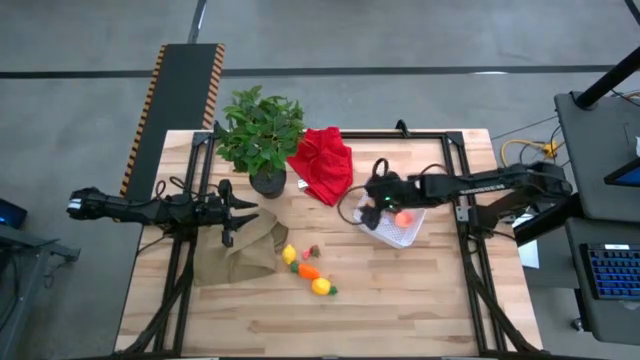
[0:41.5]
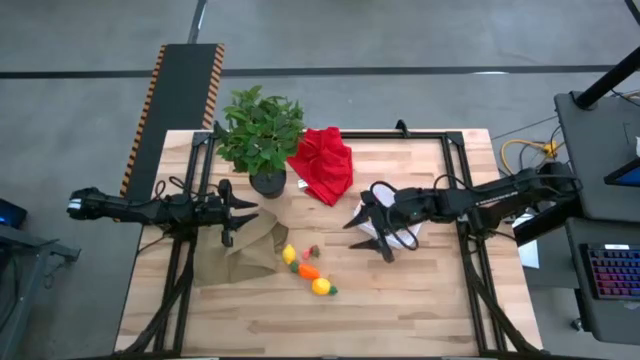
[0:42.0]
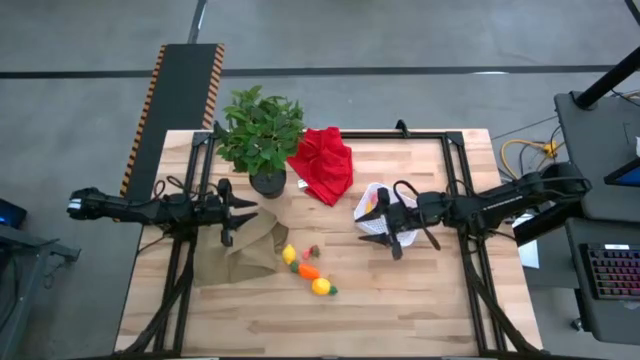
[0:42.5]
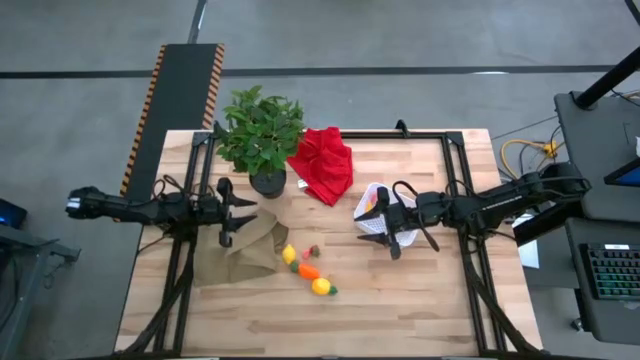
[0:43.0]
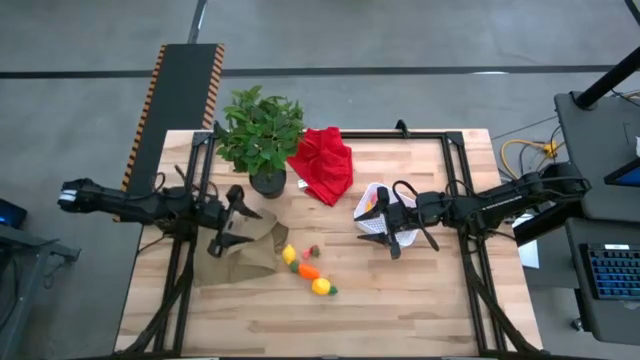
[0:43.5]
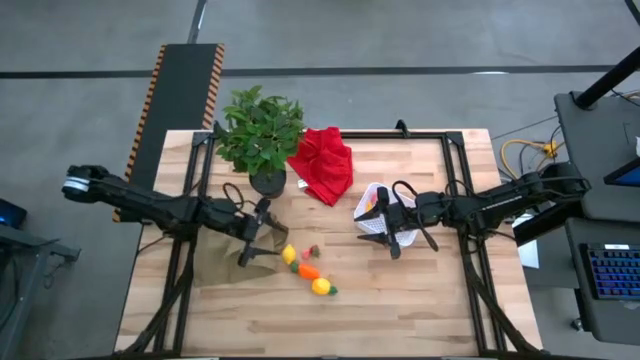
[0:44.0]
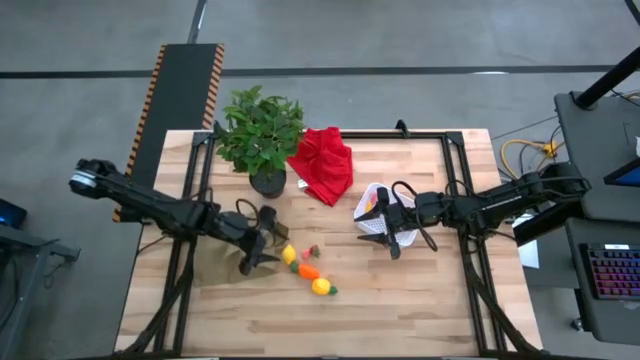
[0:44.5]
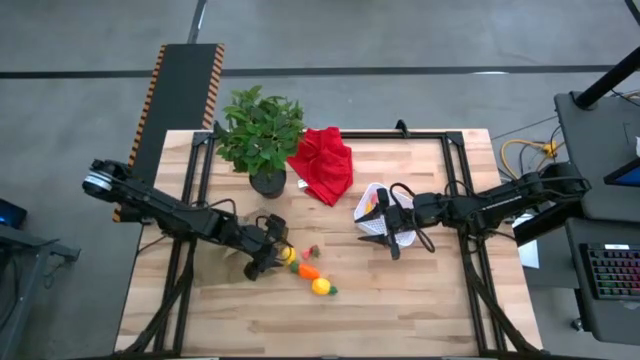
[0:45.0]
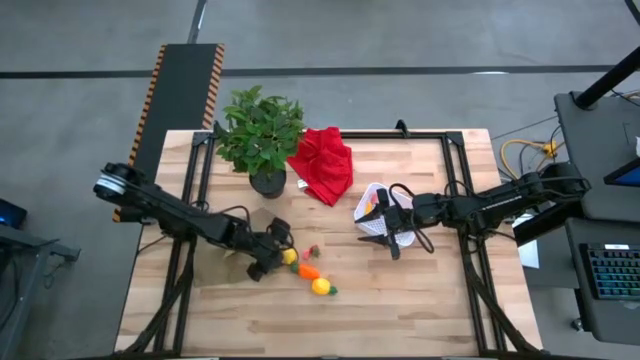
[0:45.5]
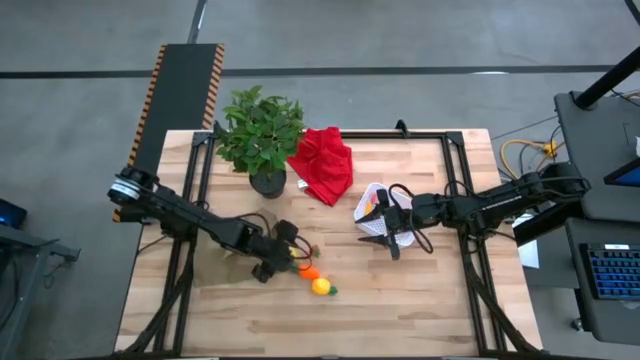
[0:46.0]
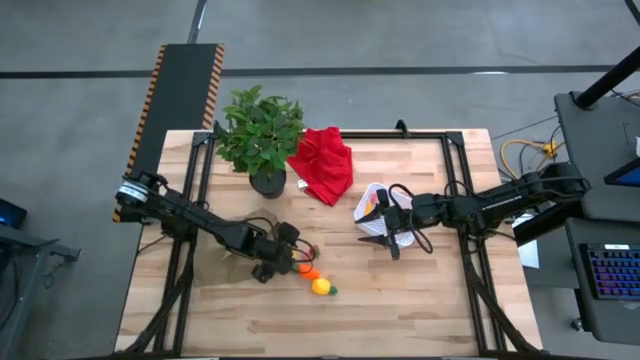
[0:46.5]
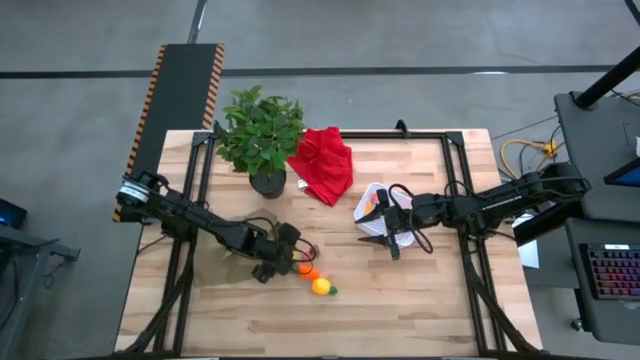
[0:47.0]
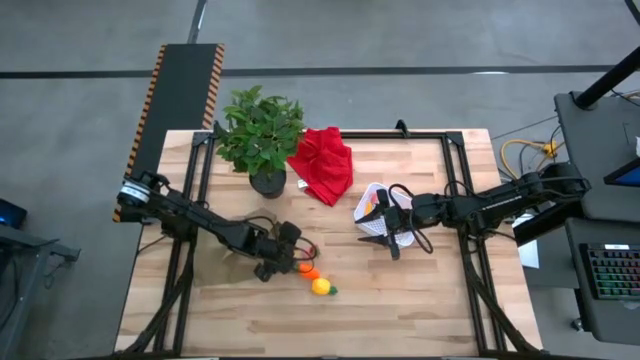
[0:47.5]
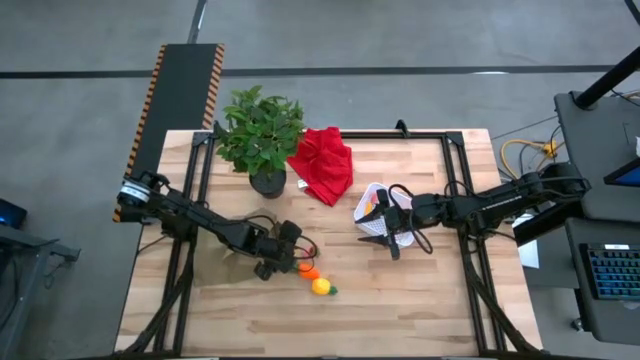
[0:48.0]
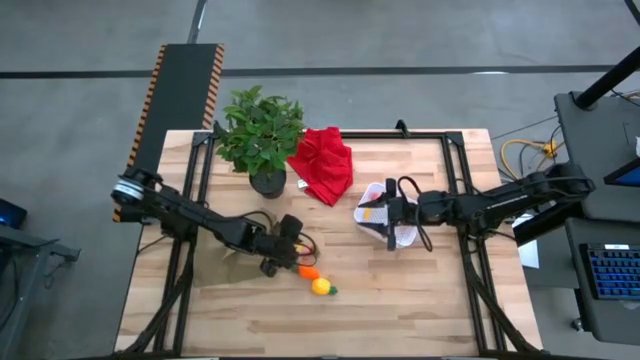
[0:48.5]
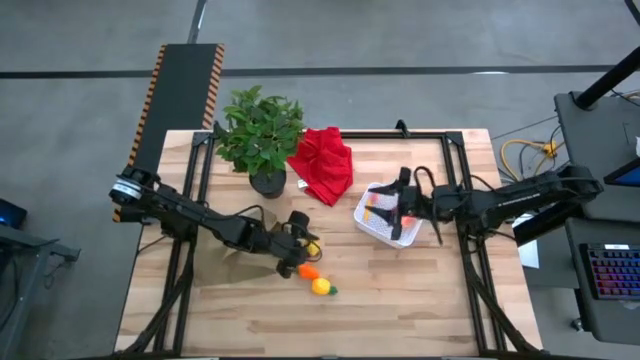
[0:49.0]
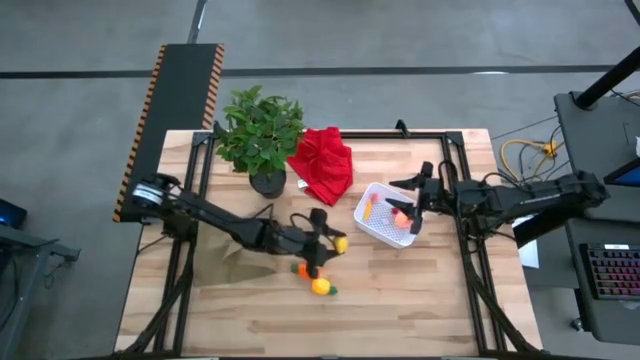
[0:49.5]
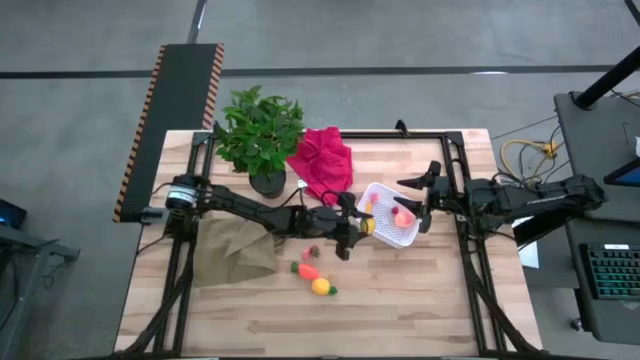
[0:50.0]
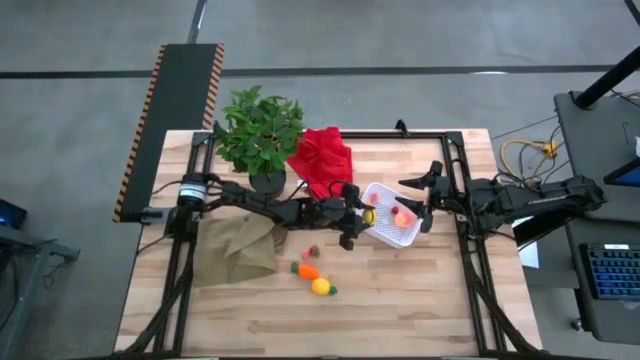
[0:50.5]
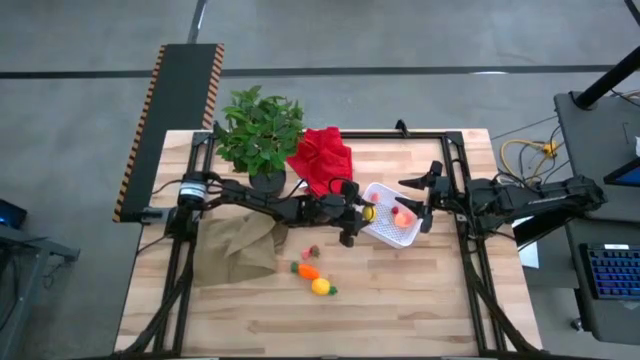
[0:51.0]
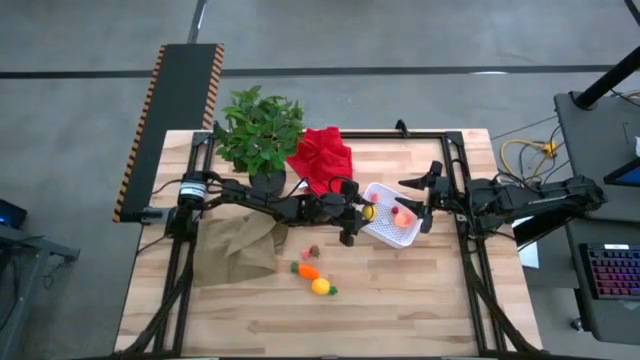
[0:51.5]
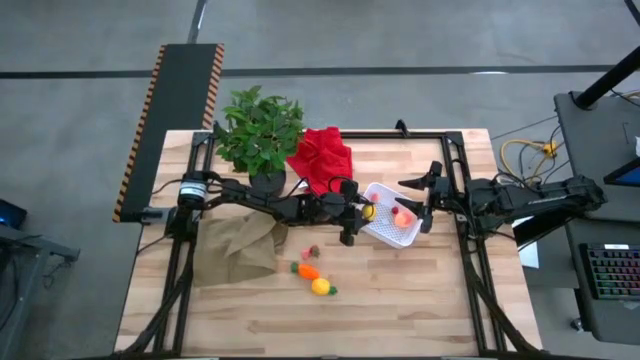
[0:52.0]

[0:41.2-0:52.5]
Task: Pick and placing Produce into tupperware
Put the yellow lemon into the white bin

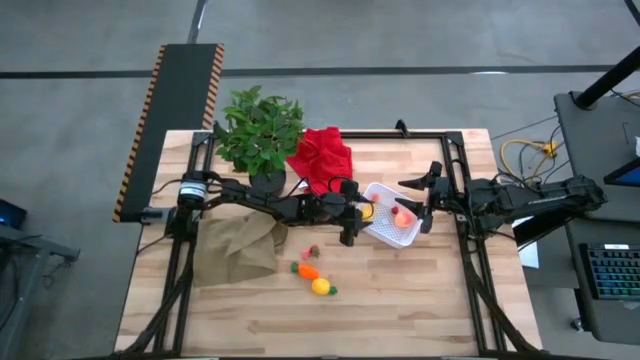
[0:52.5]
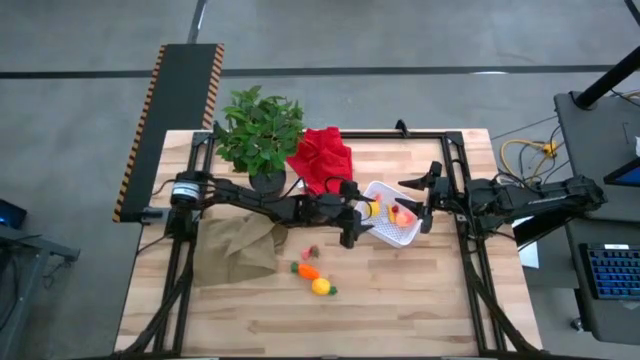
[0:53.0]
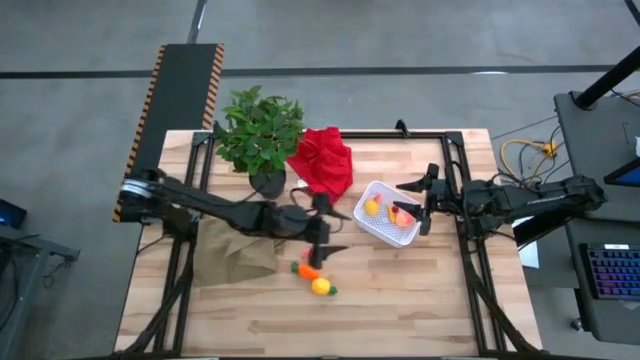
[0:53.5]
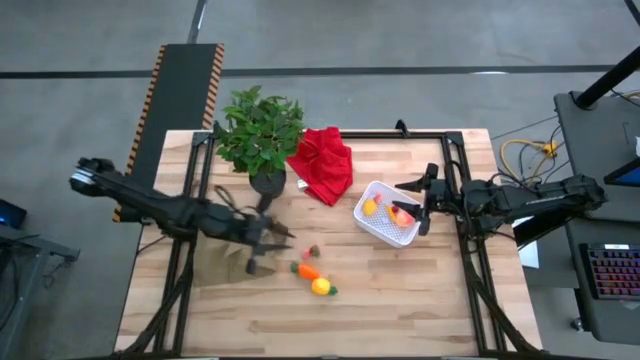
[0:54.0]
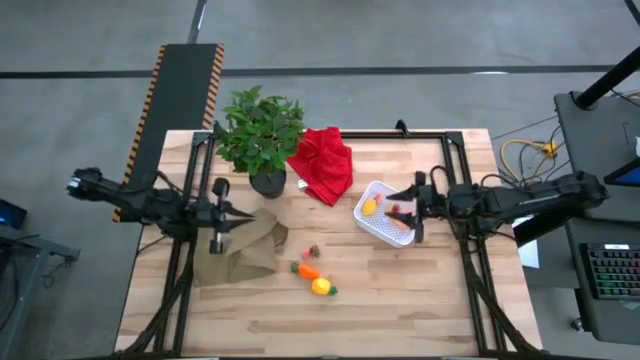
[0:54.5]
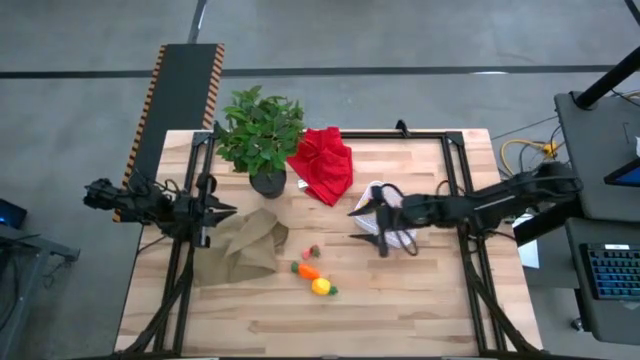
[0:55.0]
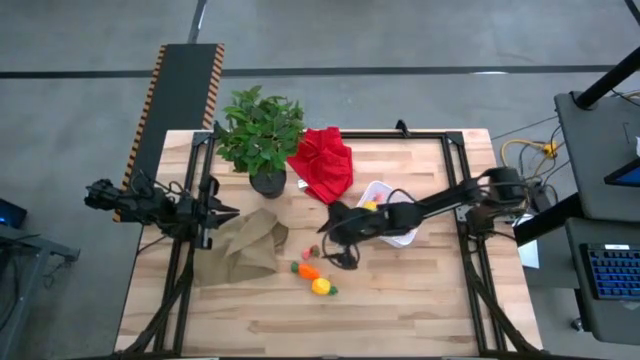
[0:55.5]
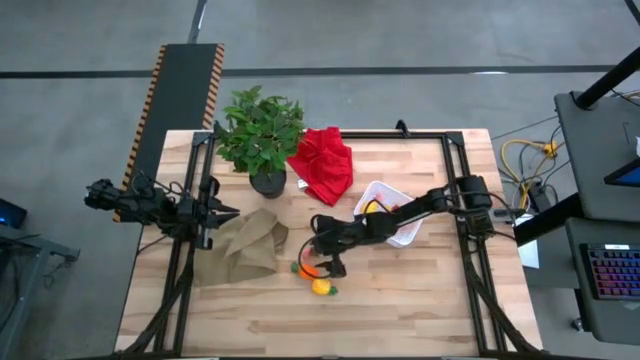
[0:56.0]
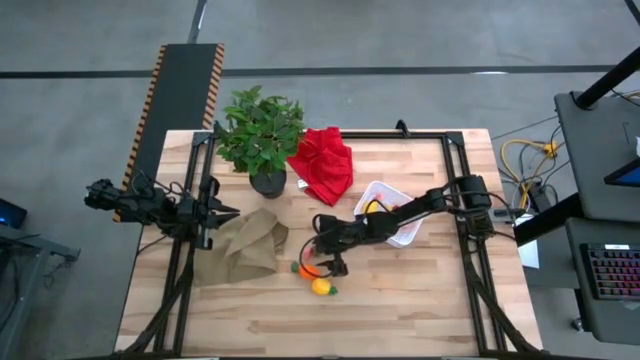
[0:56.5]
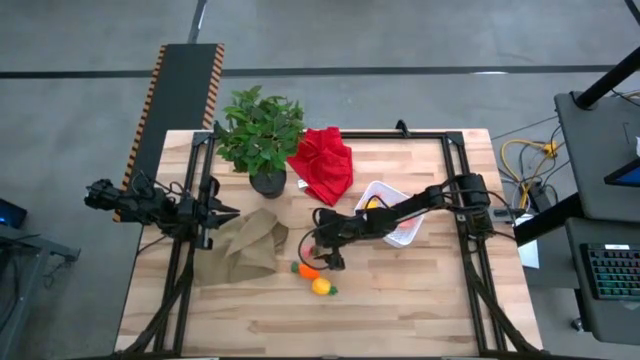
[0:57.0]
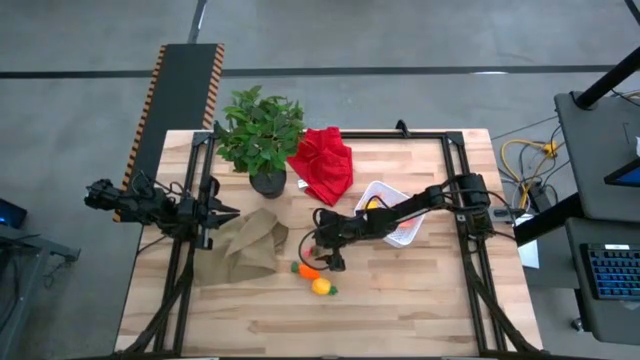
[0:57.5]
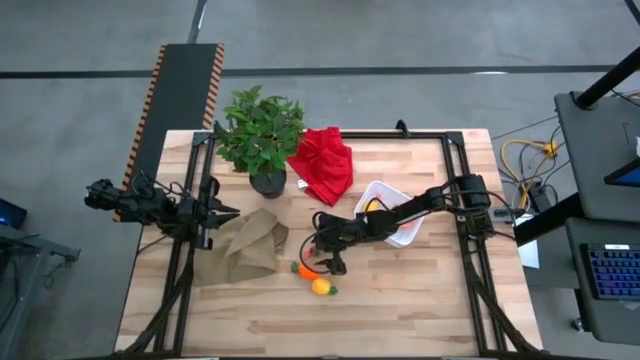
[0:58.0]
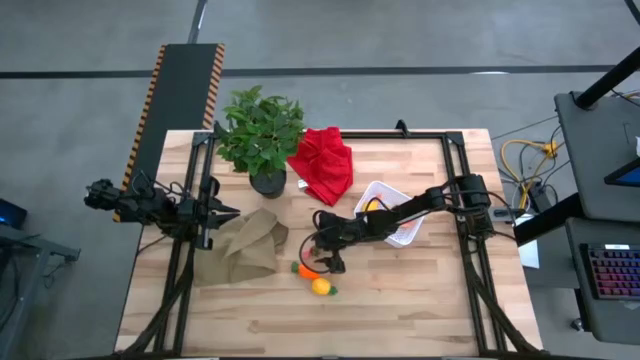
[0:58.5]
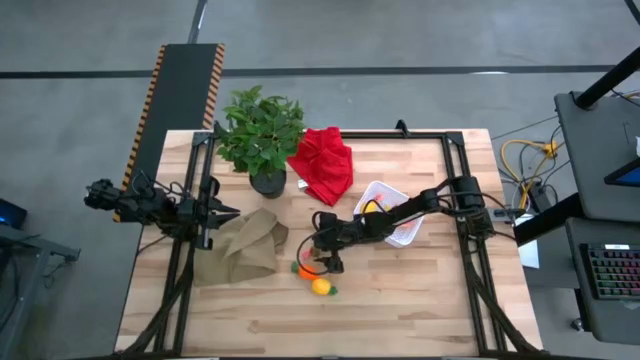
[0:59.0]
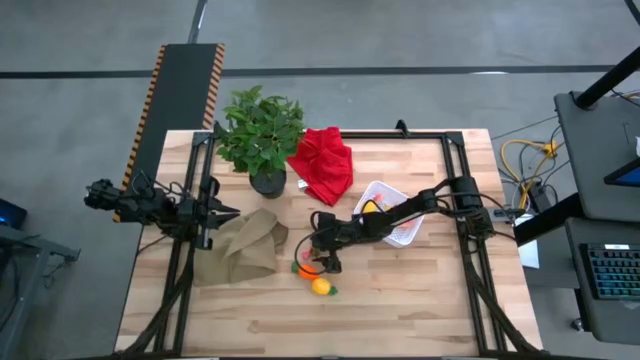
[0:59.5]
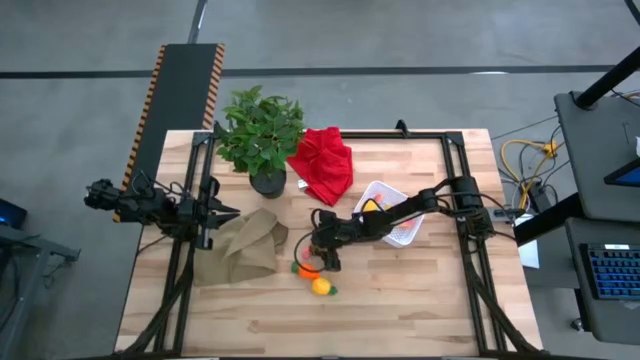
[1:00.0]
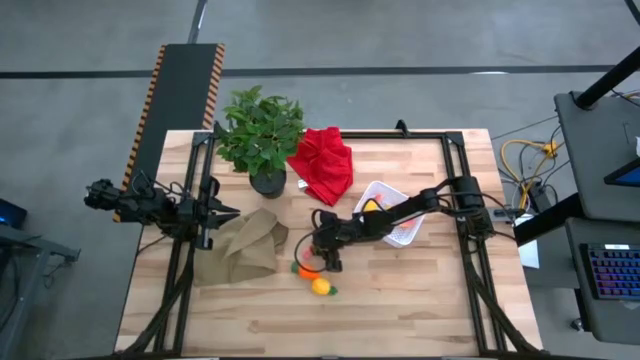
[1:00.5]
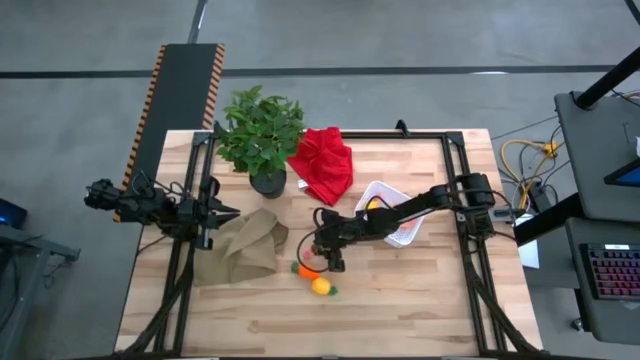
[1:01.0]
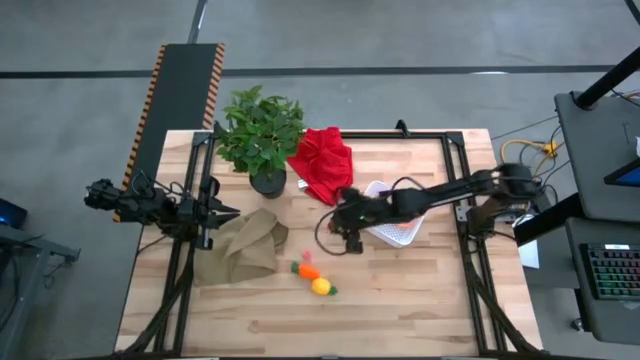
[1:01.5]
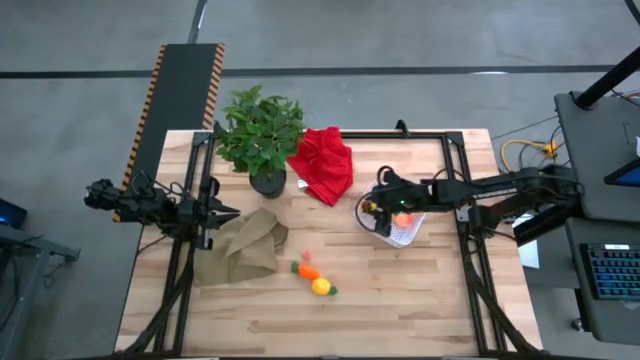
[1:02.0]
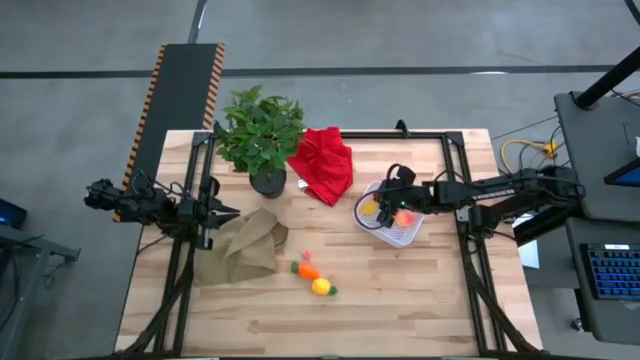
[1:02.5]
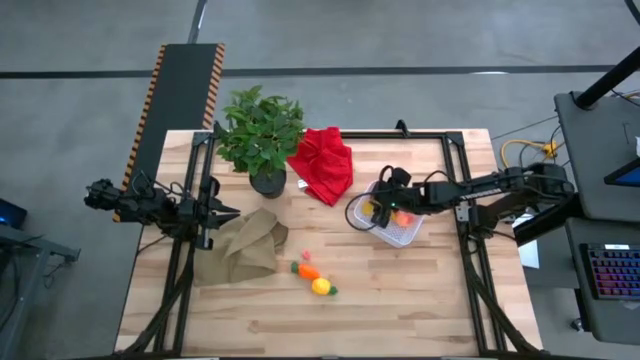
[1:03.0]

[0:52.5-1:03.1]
Put the red strawberry into the white bin
